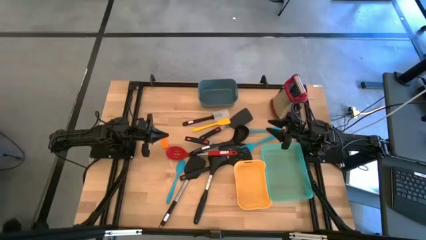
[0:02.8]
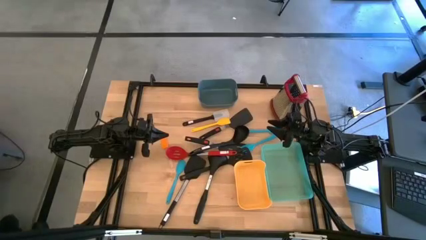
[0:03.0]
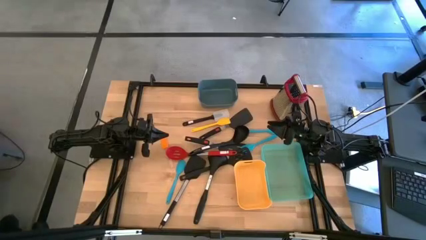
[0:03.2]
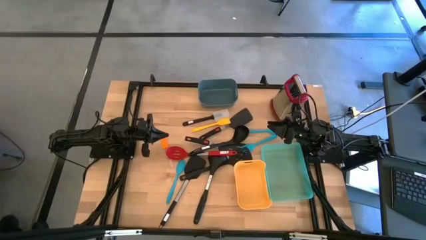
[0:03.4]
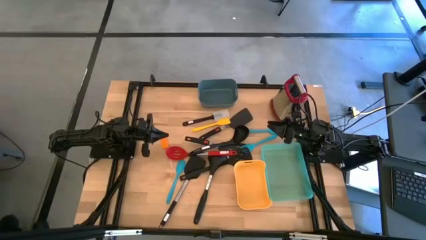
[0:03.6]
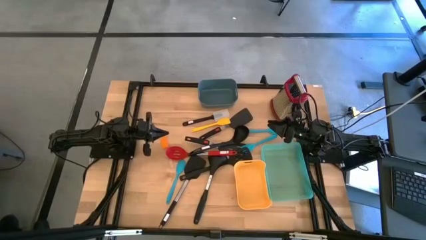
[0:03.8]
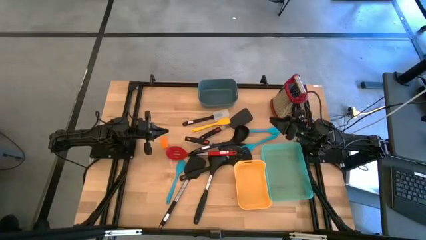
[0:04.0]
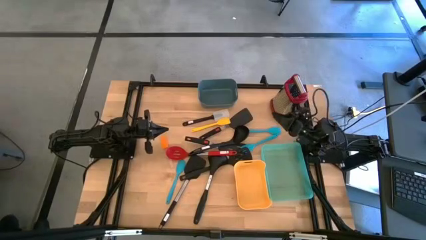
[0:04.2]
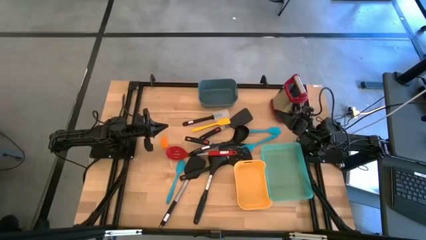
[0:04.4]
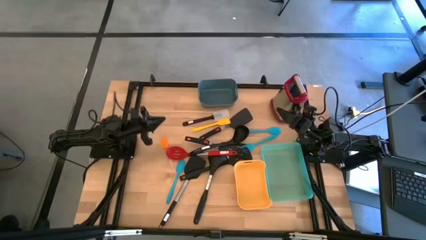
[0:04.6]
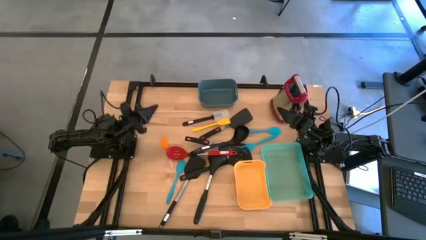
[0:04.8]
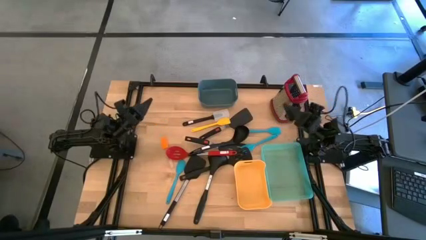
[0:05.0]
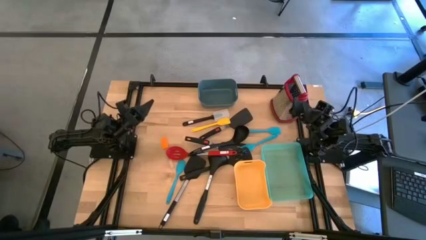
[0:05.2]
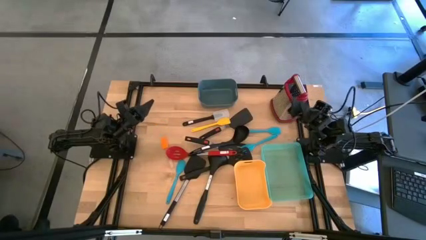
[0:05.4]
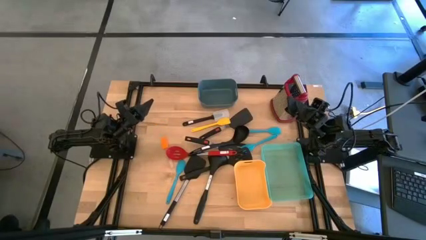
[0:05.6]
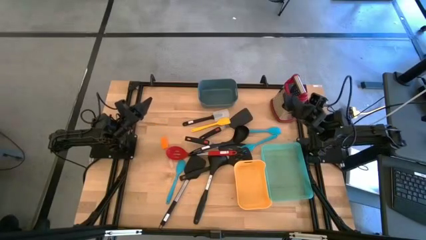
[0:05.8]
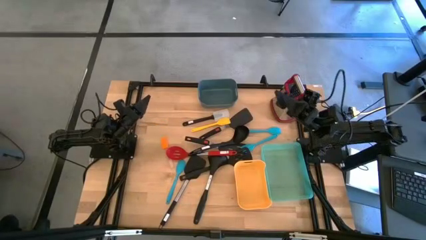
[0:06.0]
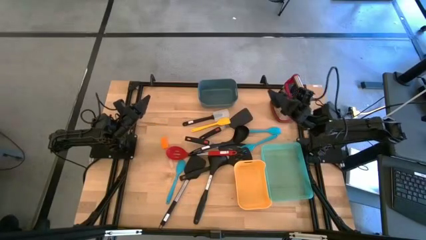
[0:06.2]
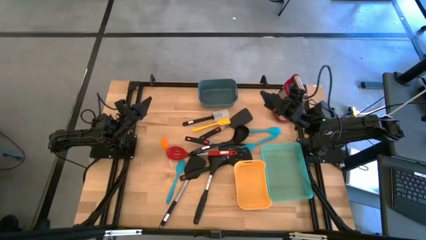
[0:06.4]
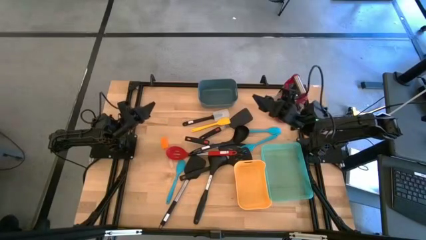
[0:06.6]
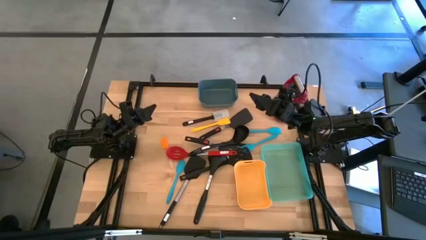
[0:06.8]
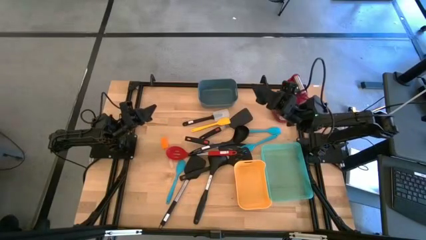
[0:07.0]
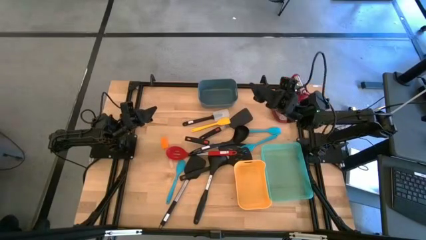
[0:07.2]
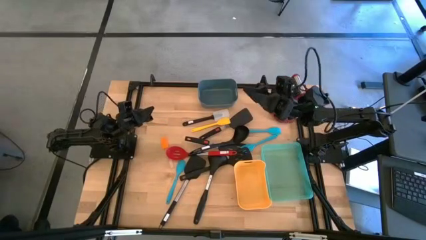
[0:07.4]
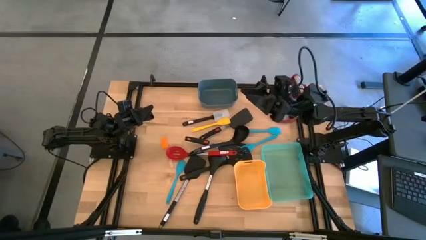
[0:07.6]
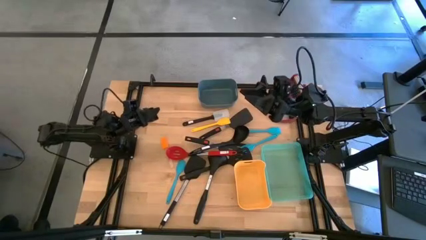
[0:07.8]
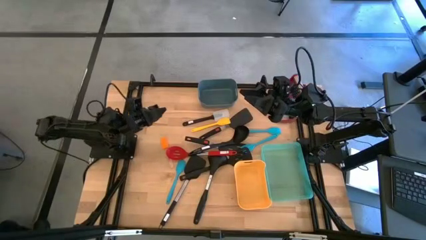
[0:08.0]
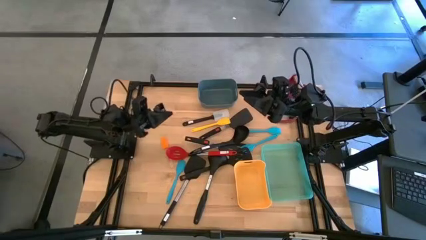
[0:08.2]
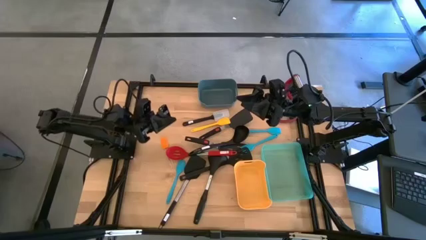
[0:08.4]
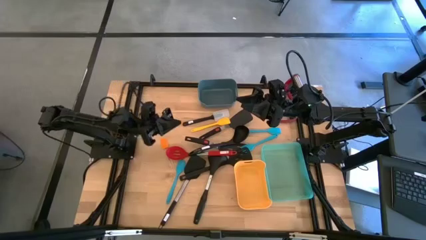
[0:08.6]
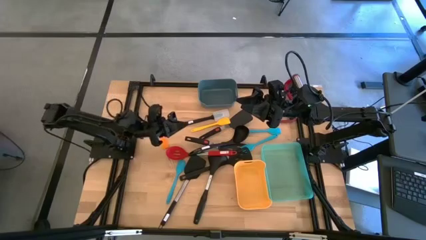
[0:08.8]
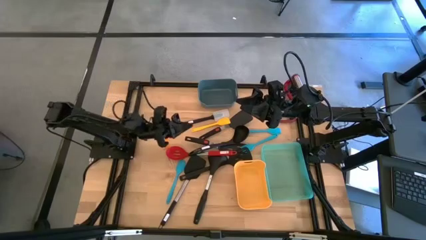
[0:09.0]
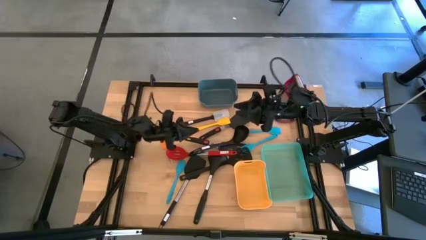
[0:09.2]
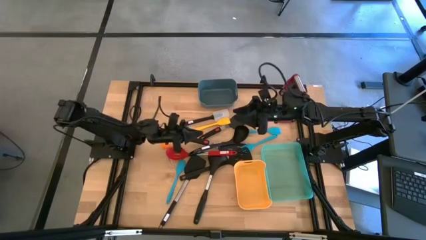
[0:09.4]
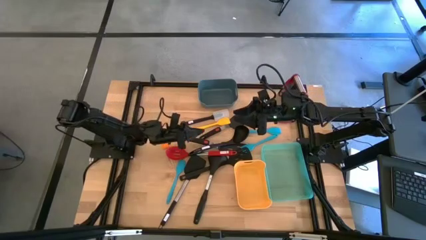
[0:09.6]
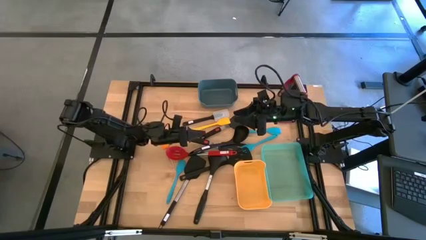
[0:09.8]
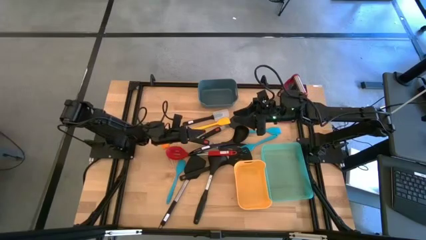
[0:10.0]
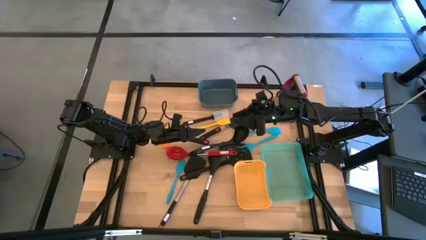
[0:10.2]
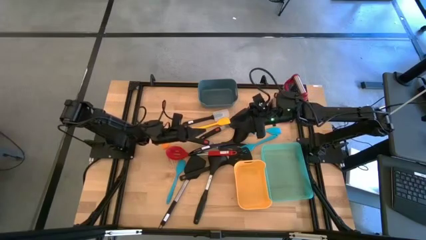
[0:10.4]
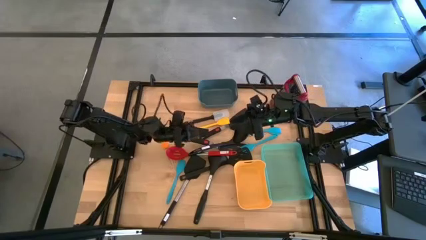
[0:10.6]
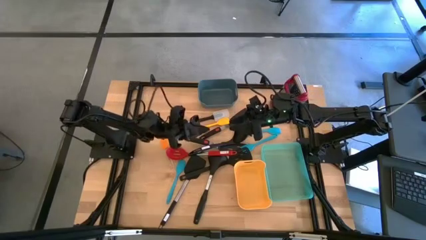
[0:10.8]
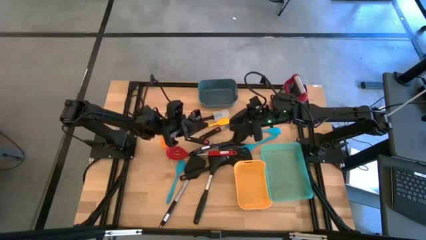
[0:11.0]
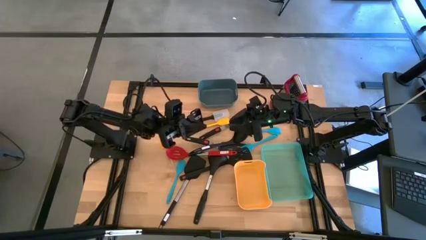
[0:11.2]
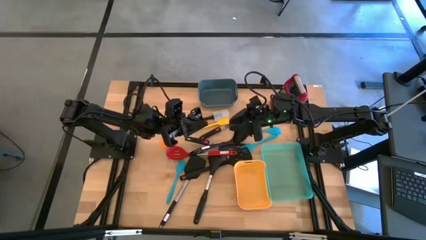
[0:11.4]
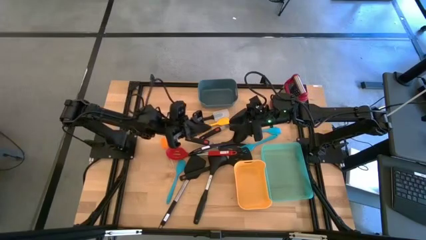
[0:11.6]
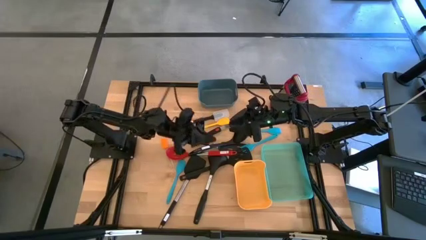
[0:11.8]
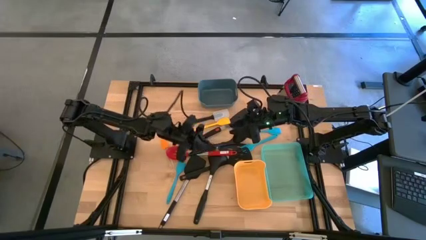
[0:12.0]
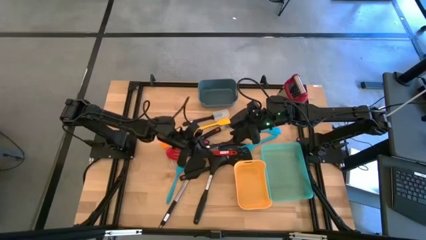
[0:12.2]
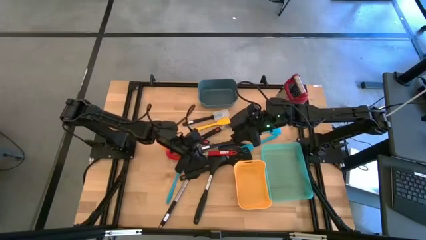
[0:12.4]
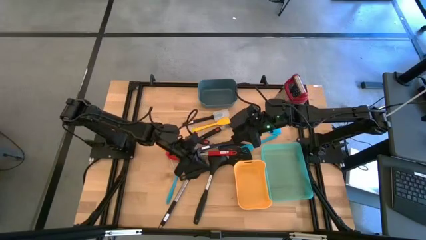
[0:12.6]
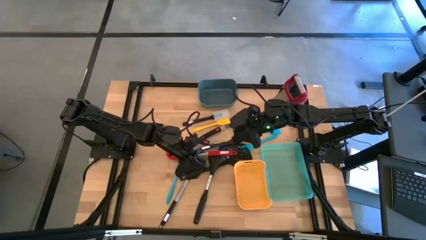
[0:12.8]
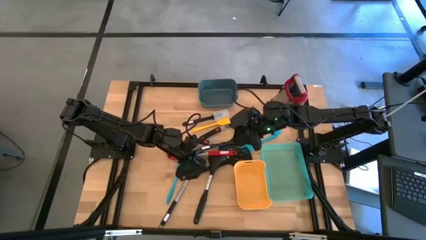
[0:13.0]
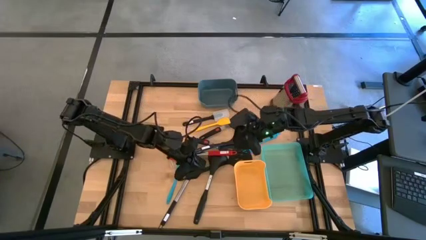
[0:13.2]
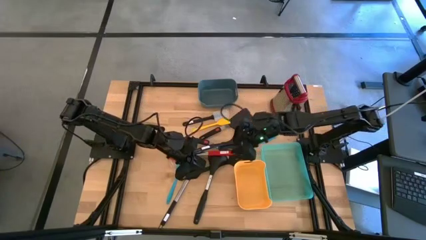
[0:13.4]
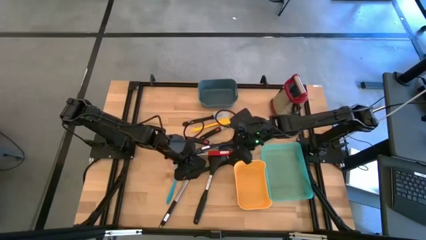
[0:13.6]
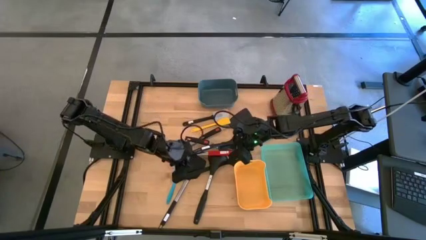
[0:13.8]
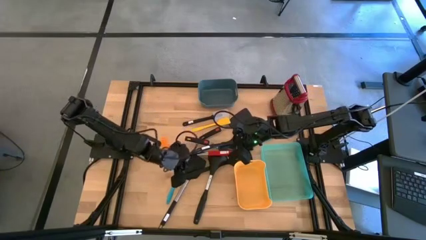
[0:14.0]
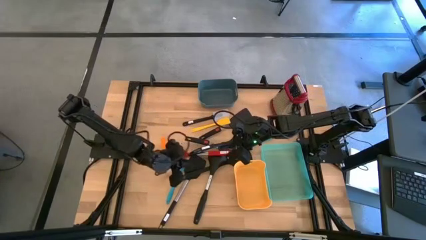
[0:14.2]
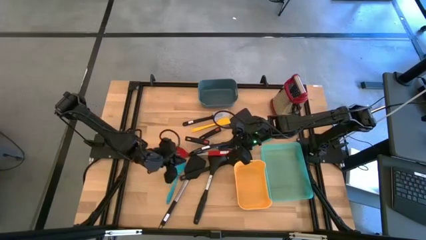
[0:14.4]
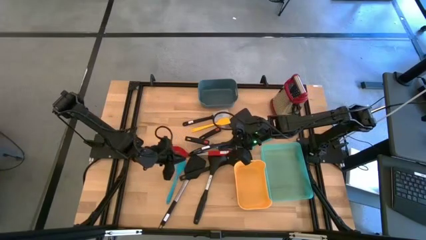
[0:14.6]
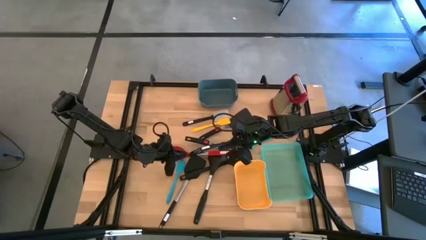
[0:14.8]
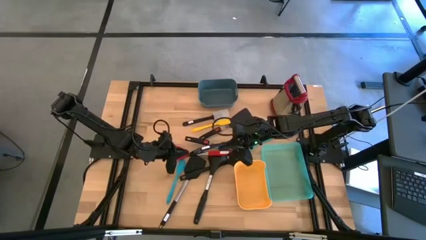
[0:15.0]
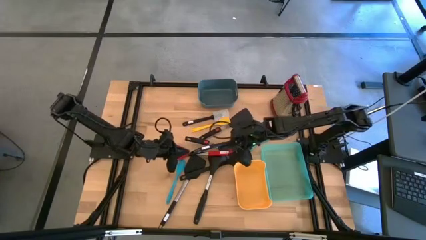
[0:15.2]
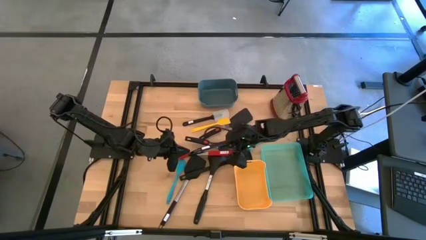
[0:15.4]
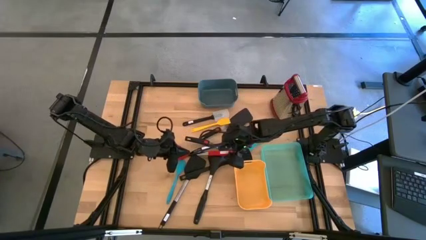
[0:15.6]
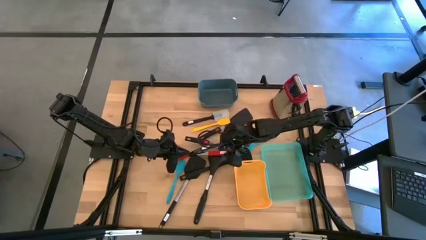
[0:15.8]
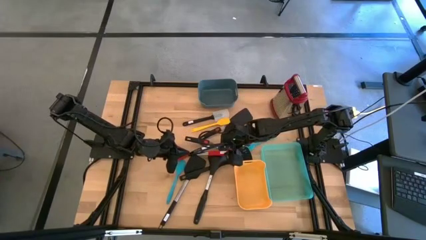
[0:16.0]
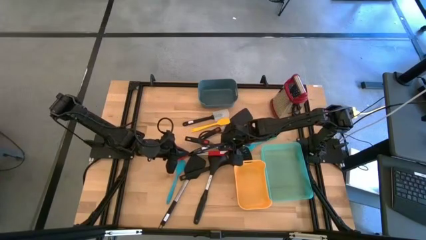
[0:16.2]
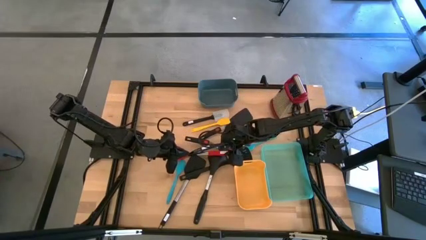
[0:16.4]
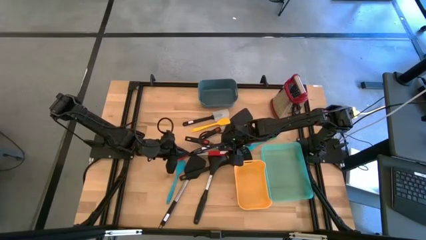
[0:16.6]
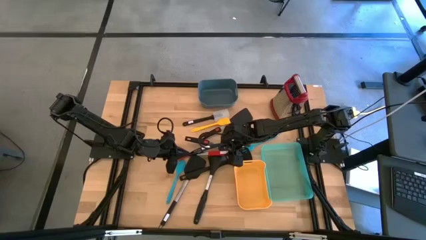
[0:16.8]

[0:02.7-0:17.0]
Task: Pick & Place Kitchen Items
Put the red serving spoon into the green bin
